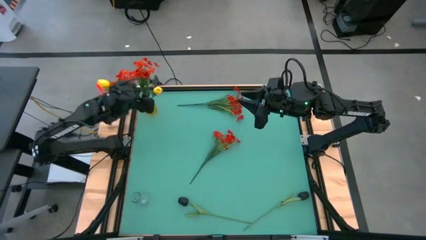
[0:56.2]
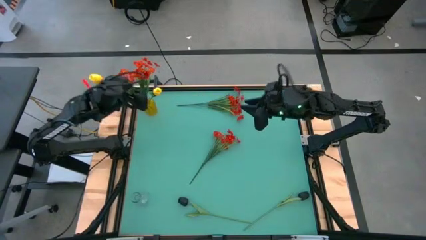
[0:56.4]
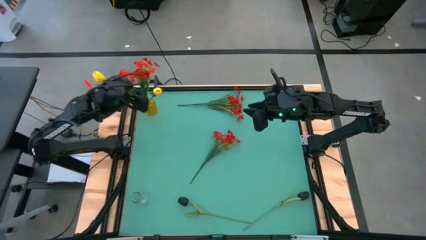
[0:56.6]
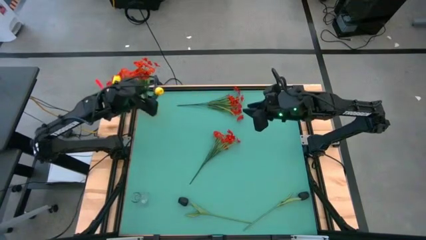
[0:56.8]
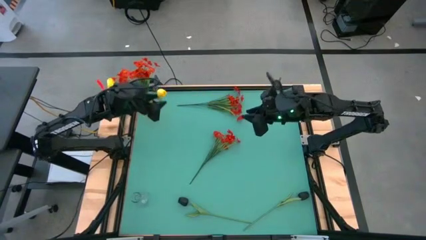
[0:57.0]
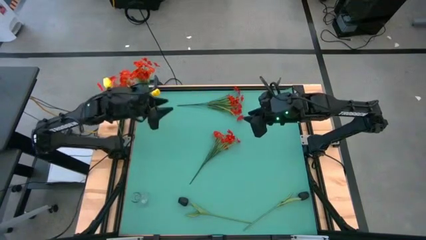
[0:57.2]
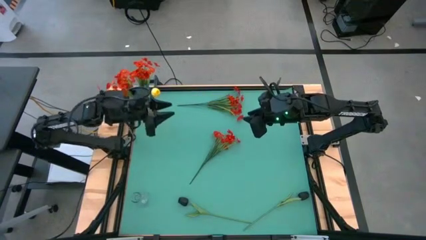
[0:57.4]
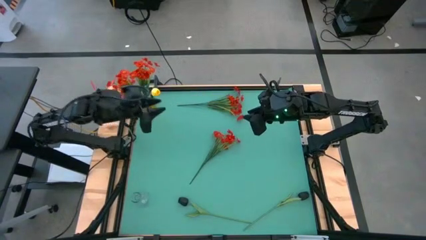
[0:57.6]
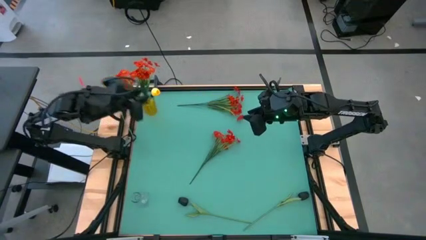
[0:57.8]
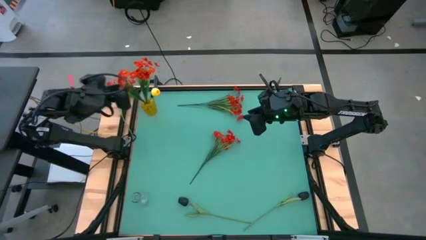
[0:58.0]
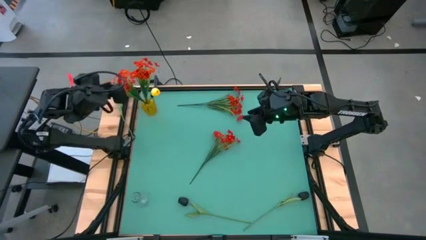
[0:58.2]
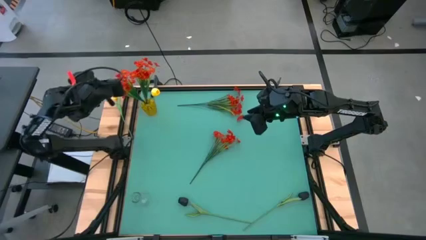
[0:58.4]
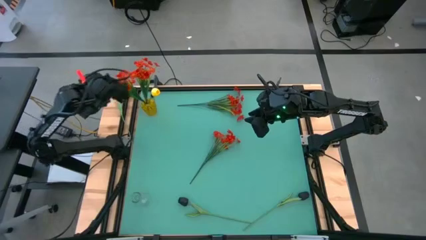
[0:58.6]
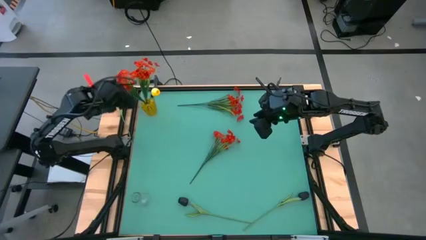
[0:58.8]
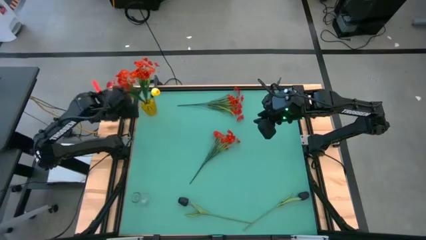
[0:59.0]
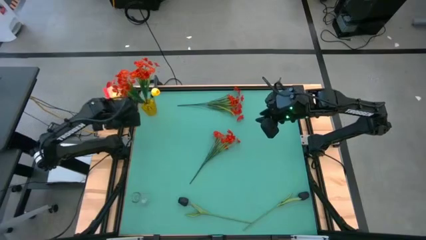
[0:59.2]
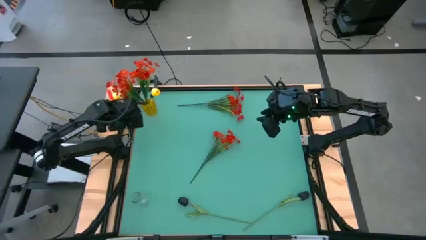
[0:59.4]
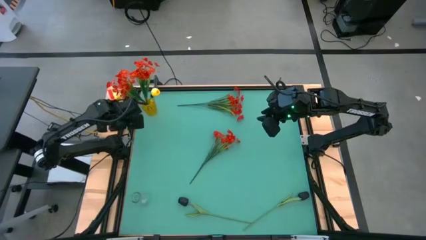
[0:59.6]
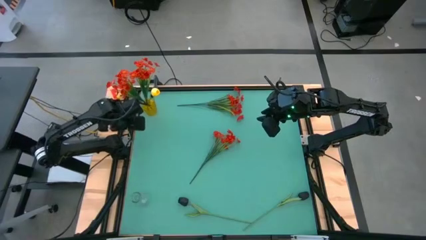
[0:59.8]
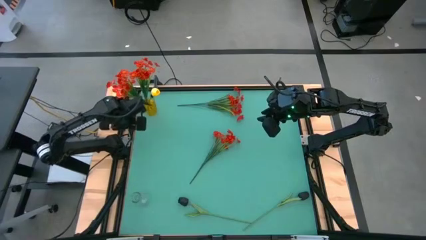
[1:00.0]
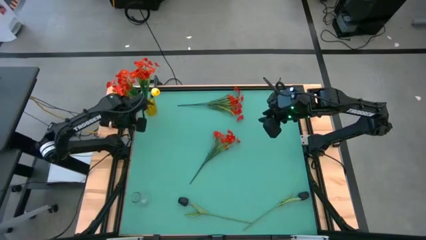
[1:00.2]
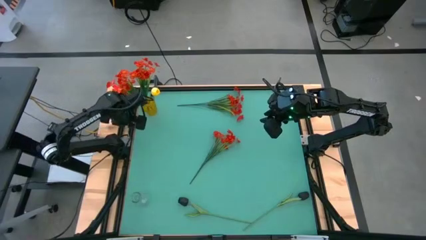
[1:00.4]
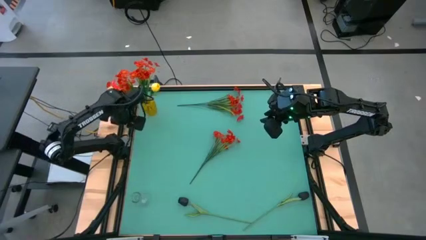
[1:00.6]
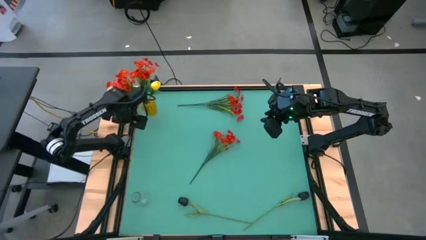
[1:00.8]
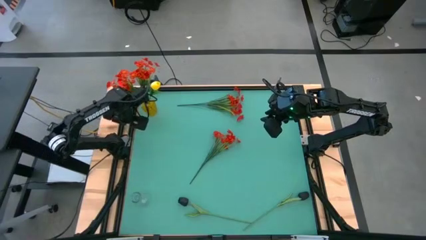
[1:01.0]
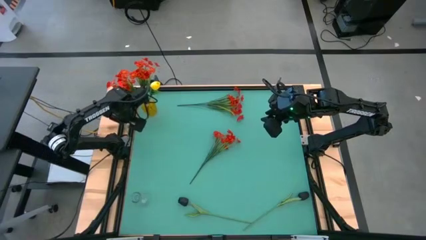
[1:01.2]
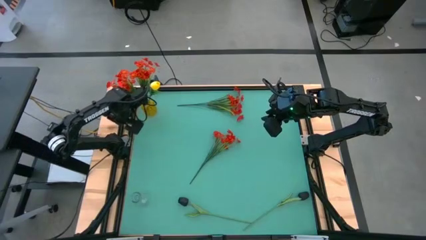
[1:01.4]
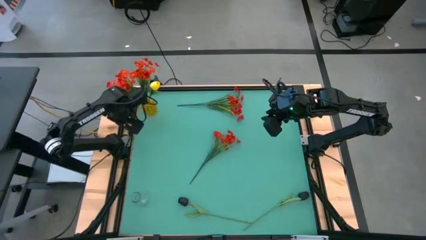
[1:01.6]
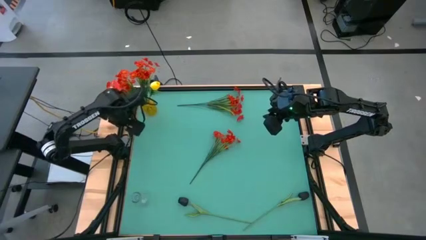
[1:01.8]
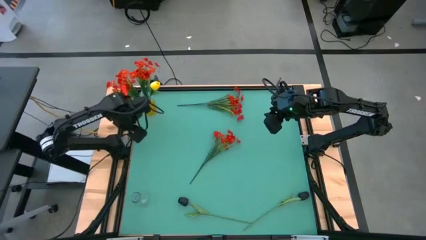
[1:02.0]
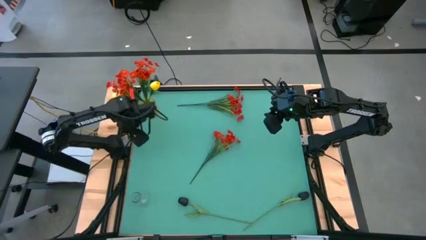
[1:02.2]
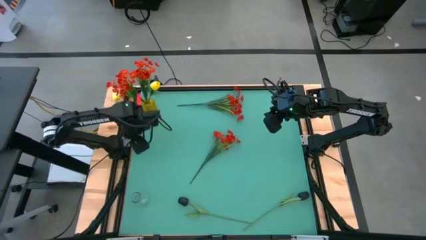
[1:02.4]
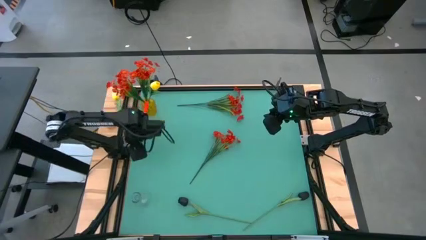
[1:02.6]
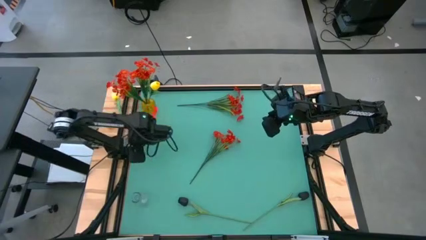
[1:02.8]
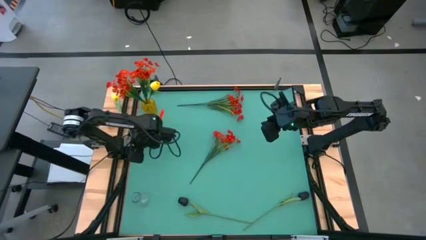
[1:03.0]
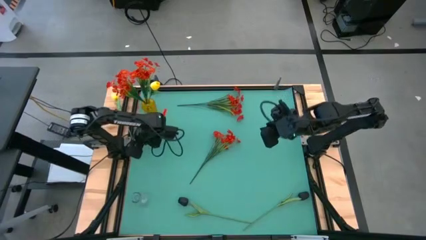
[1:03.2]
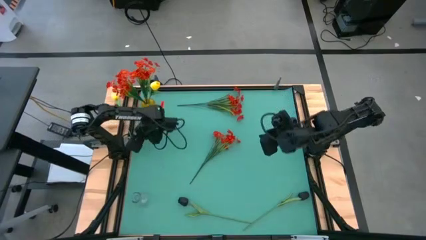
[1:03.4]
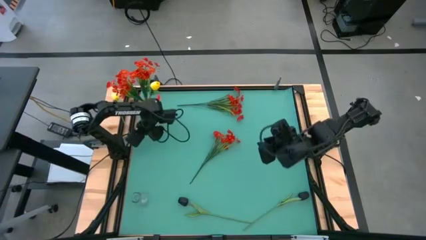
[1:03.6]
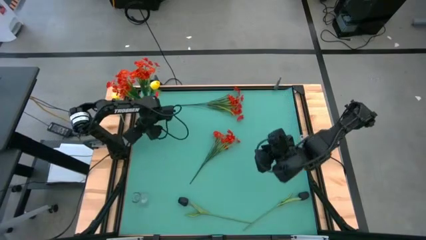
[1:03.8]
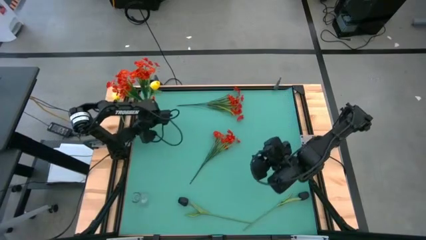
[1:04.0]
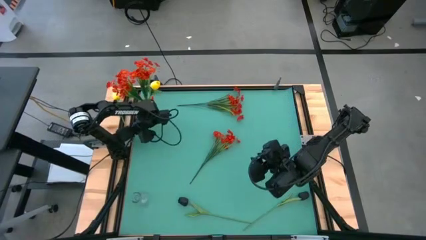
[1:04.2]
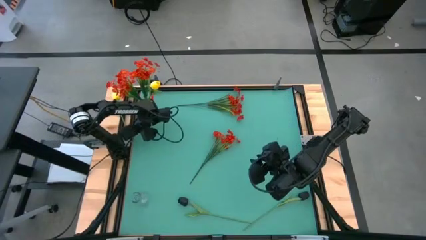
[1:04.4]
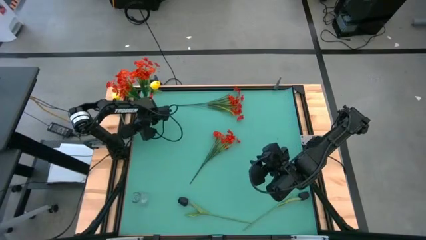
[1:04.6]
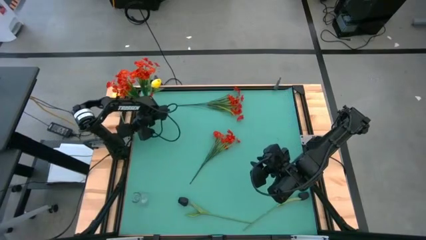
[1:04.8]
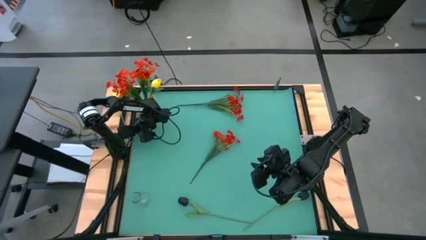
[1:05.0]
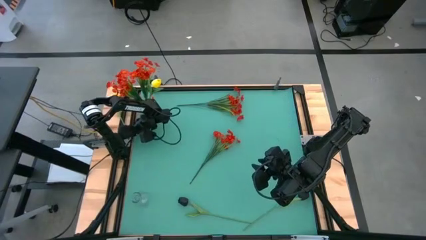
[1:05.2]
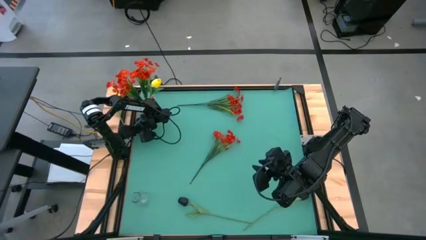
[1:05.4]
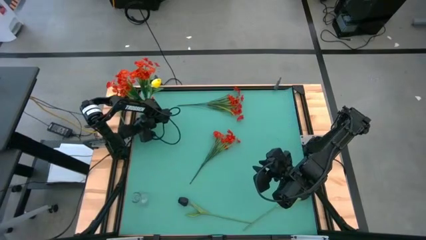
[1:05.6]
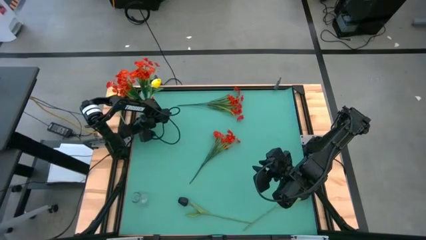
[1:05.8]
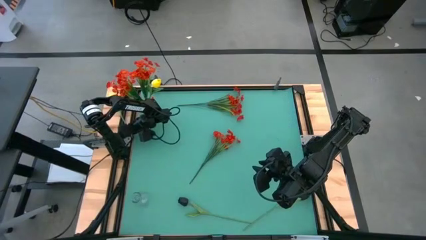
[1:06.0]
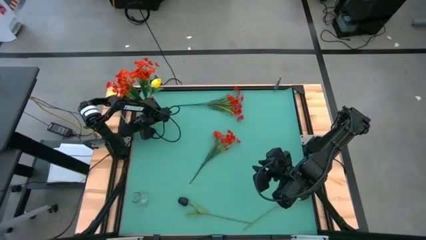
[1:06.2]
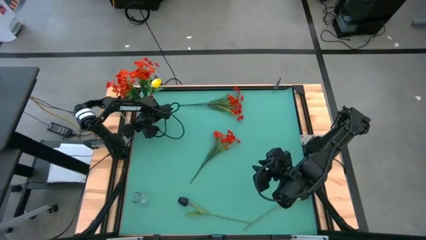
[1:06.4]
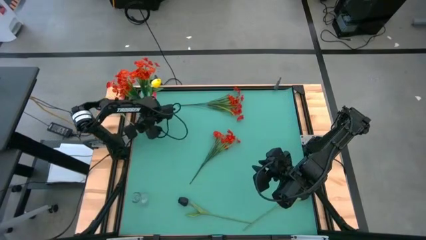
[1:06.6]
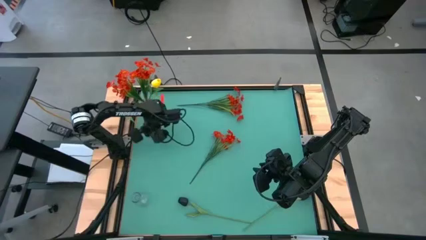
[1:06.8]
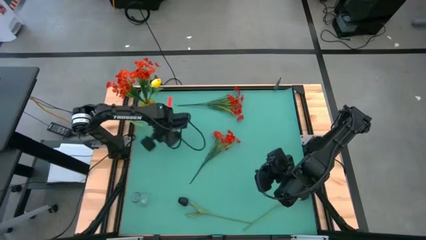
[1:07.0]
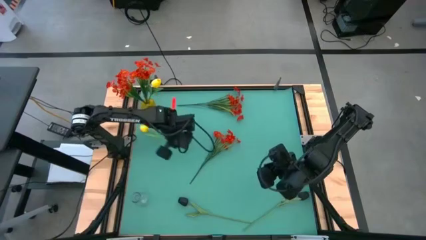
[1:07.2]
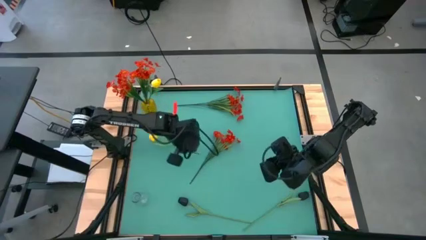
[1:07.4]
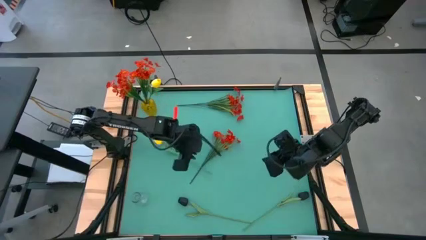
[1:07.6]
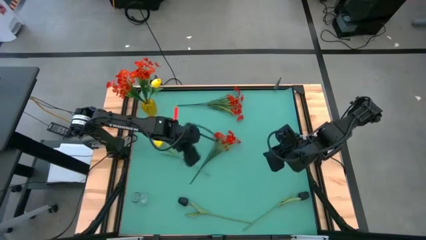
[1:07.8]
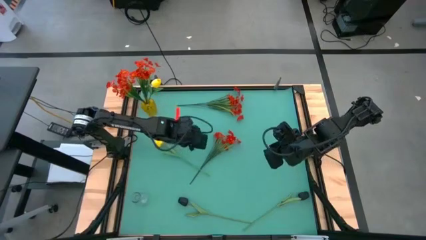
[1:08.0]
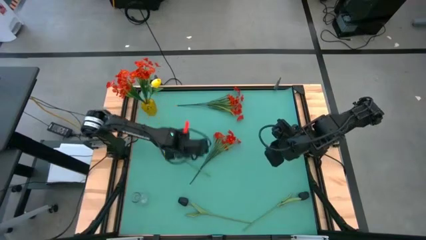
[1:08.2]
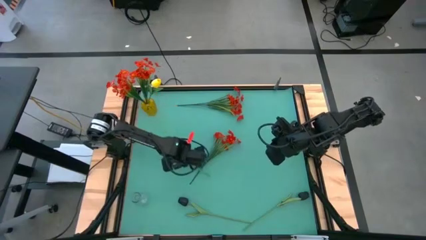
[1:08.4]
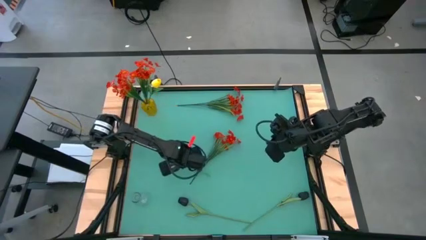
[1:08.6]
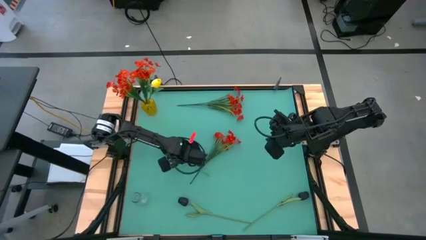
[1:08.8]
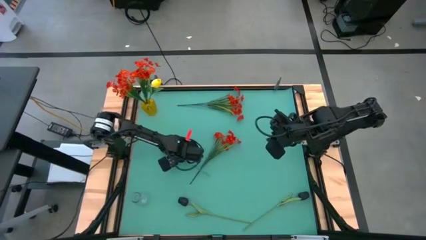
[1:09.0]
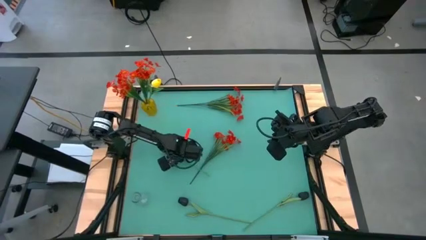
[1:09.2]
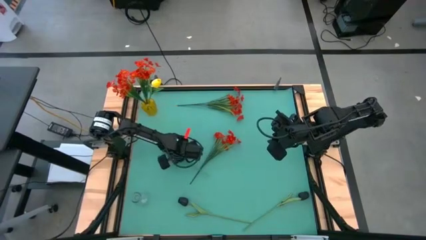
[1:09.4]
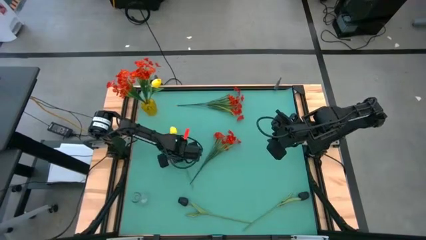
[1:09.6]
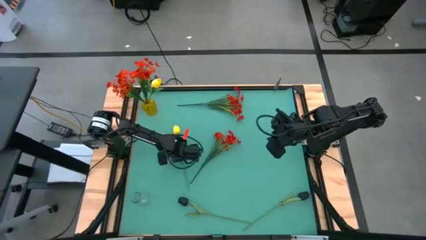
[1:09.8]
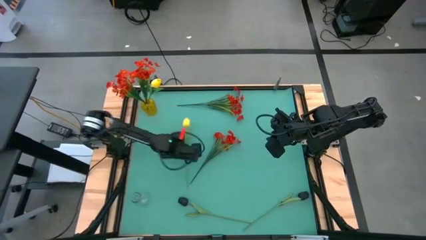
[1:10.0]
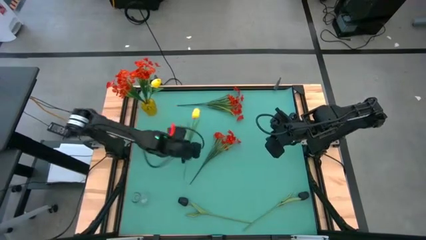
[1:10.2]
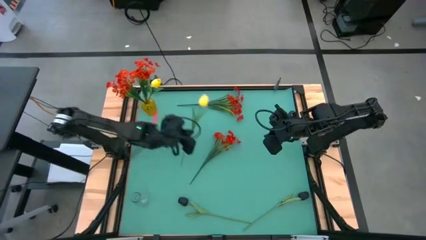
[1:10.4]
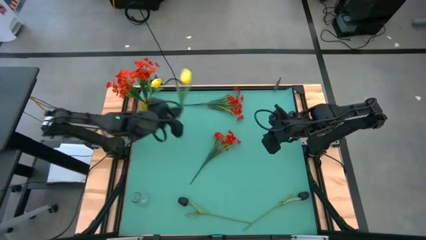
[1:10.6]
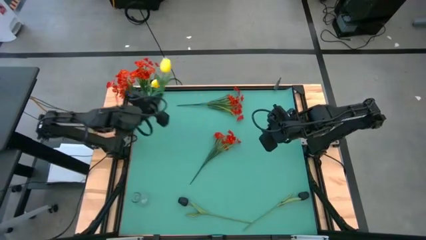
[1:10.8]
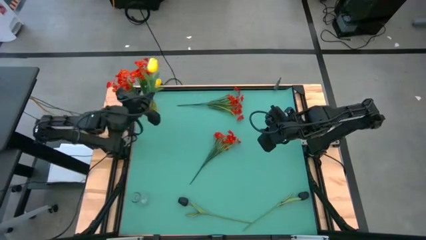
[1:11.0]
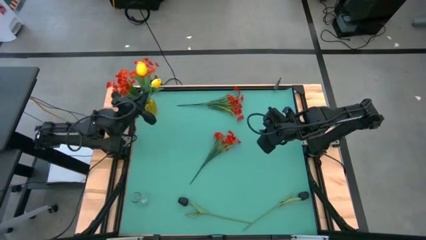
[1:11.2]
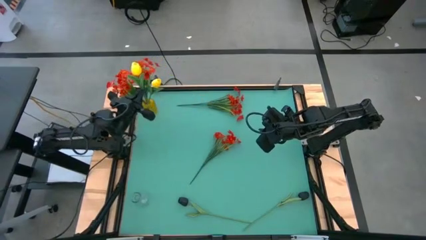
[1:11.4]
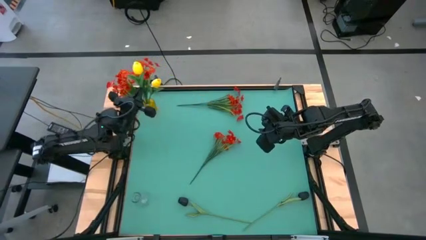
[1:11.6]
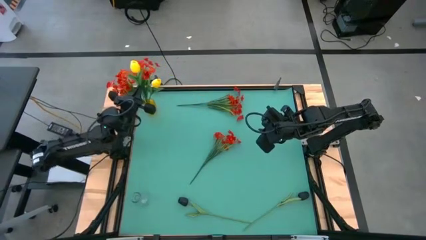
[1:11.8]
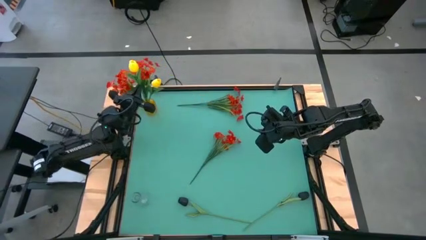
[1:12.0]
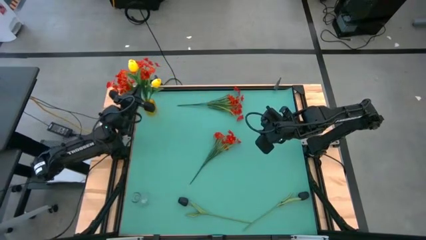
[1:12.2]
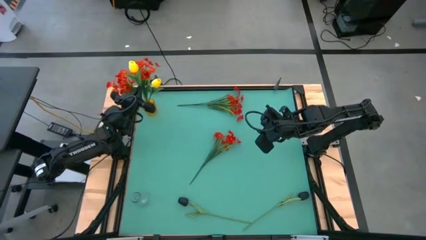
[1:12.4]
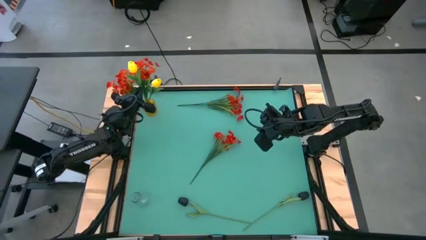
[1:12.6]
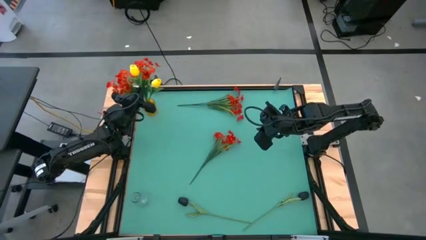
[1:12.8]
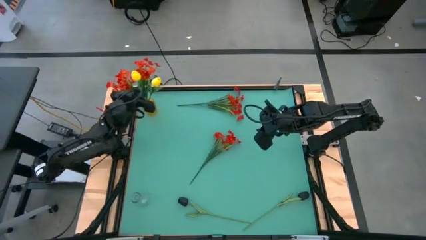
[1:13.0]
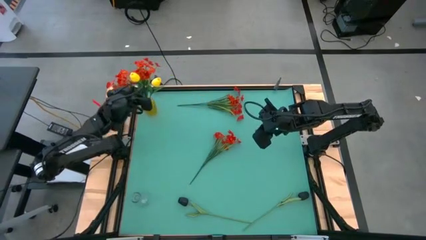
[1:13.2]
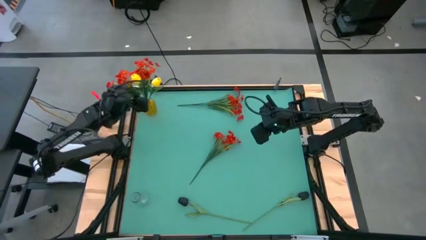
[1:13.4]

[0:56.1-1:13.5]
Task: Sort flowers into vase by color
Put the yellow flower into the yellow vase
